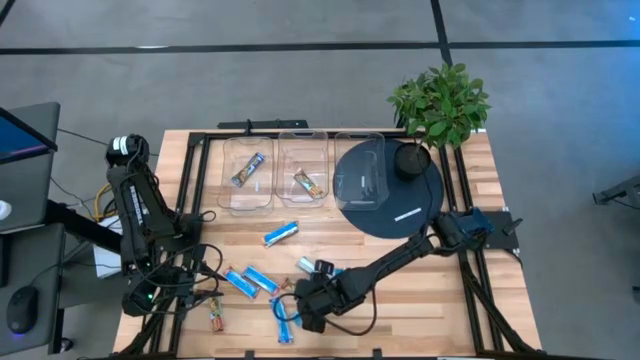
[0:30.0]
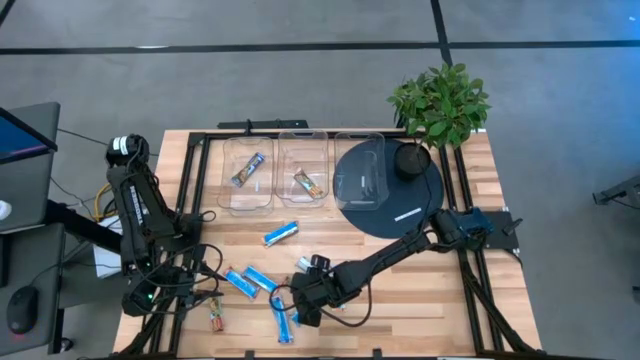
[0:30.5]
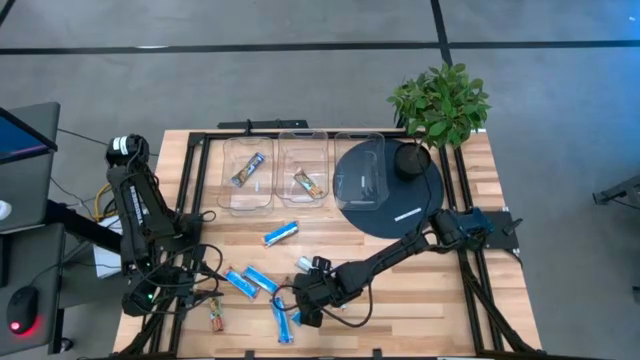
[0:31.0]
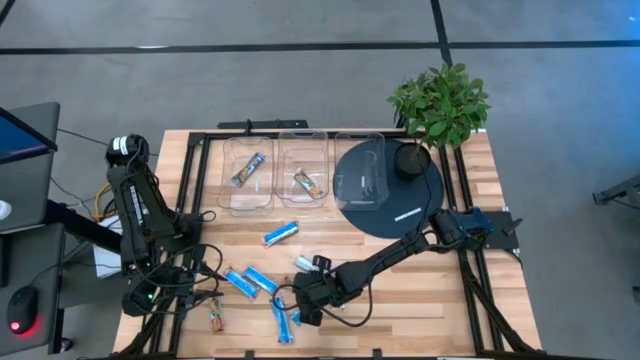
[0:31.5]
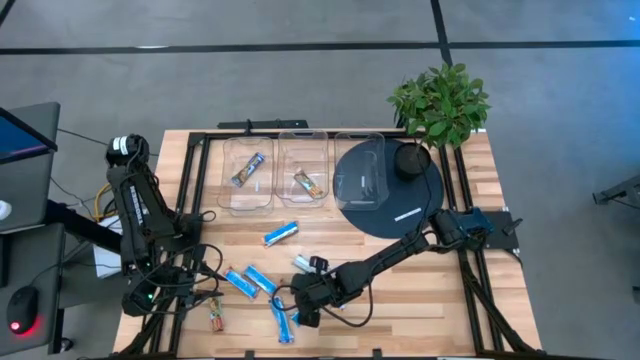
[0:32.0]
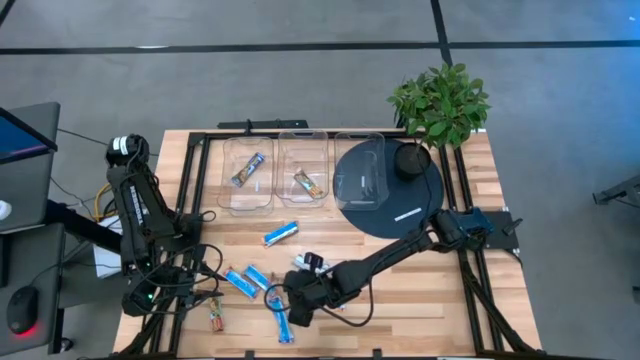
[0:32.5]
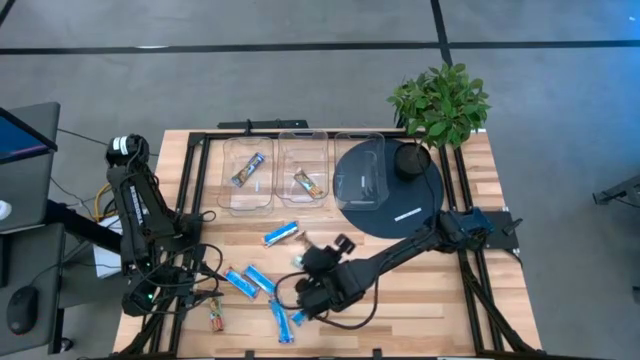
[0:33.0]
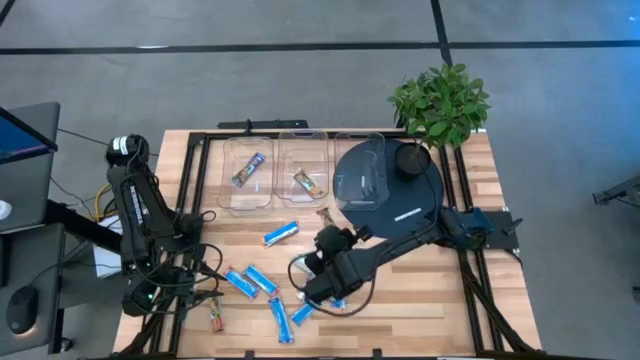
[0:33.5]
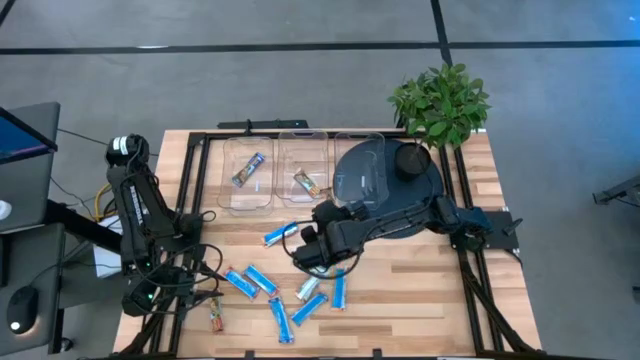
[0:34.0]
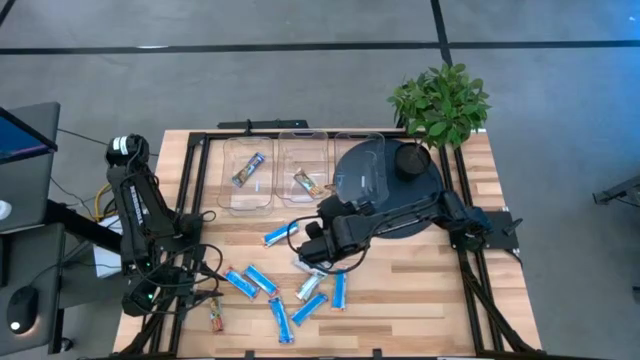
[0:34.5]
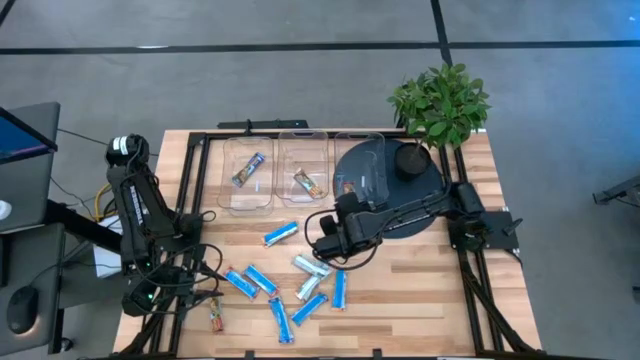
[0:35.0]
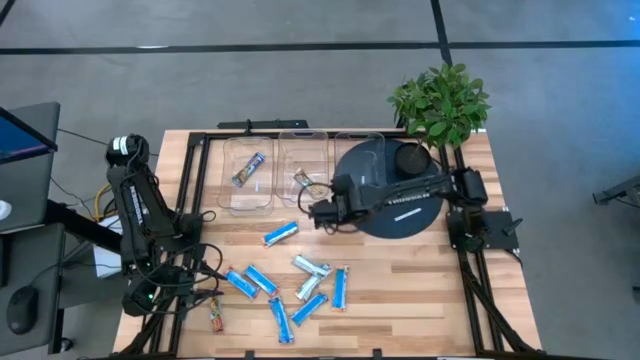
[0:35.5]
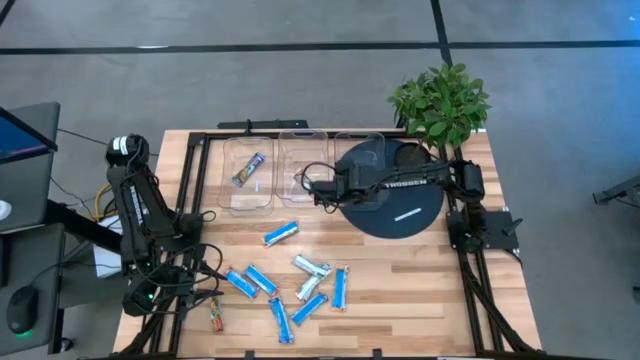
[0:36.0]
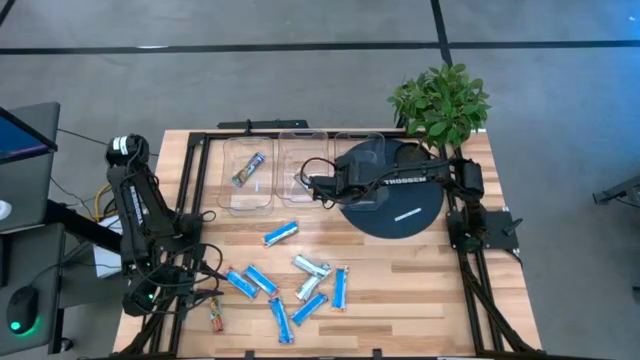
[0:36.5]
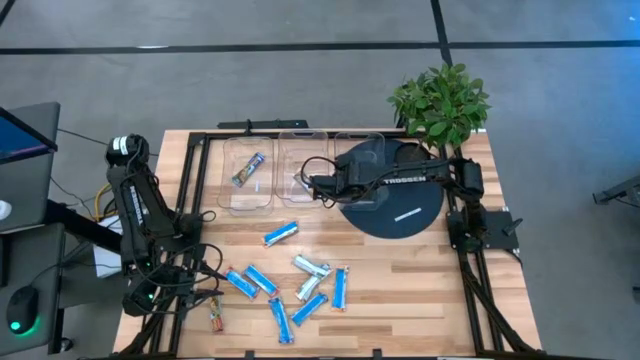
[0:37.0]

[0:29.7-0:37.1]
Task: Pick and place Granola Bars by type
Put the red granola bar into the right transparent bin

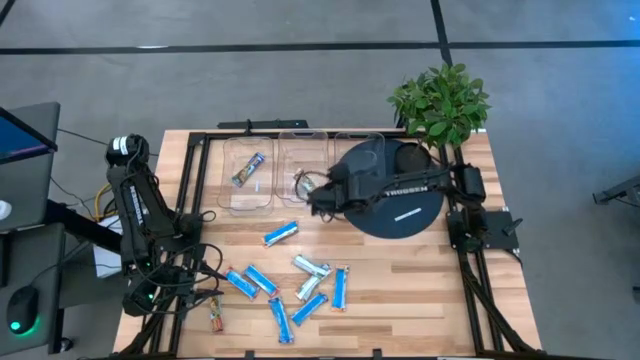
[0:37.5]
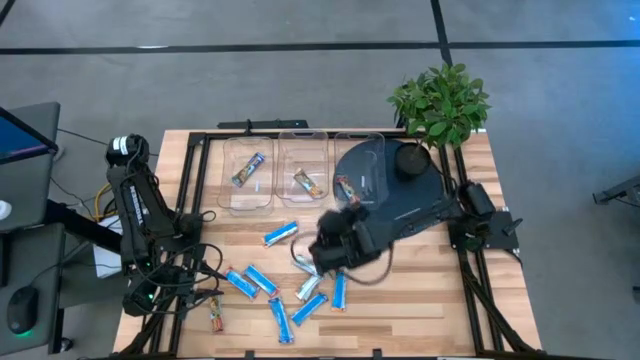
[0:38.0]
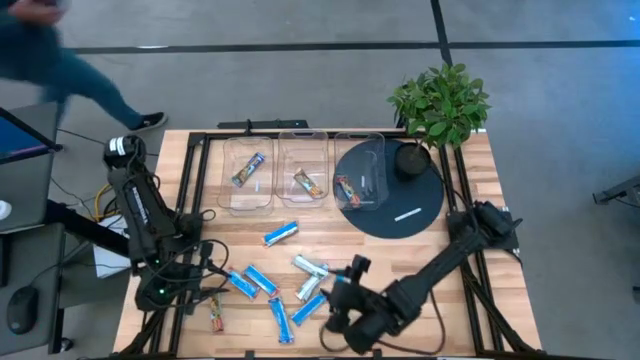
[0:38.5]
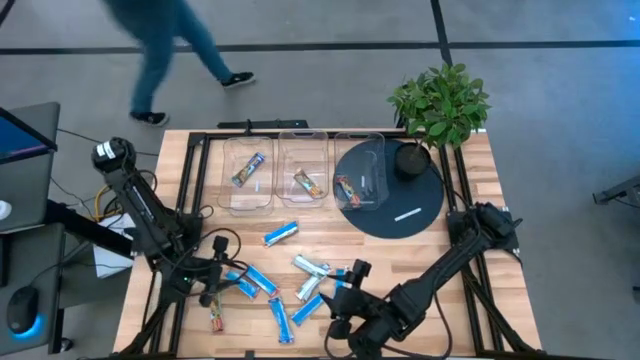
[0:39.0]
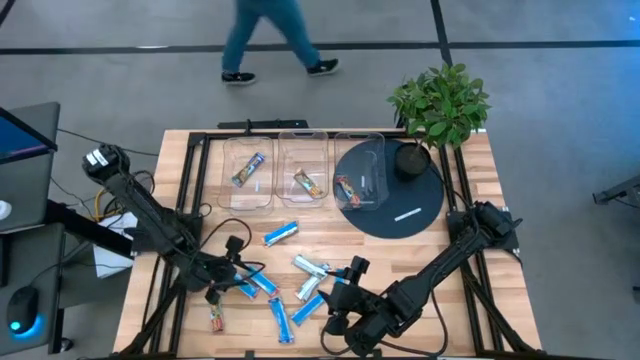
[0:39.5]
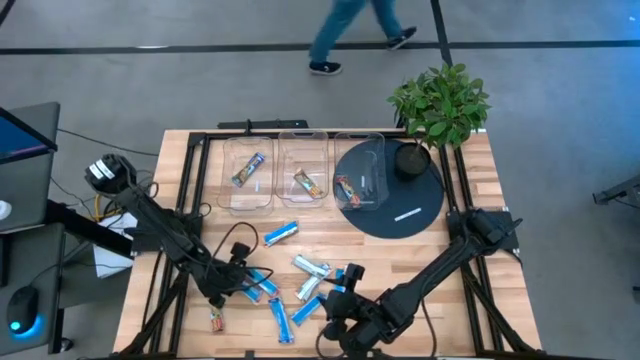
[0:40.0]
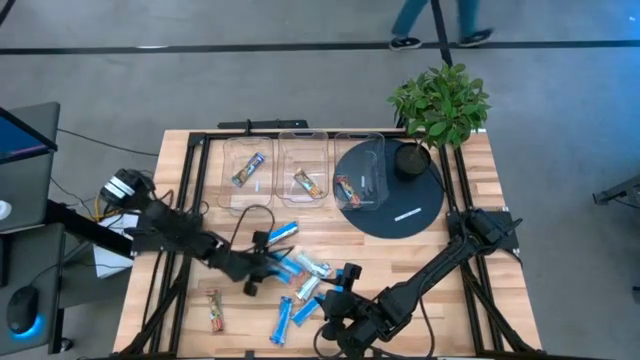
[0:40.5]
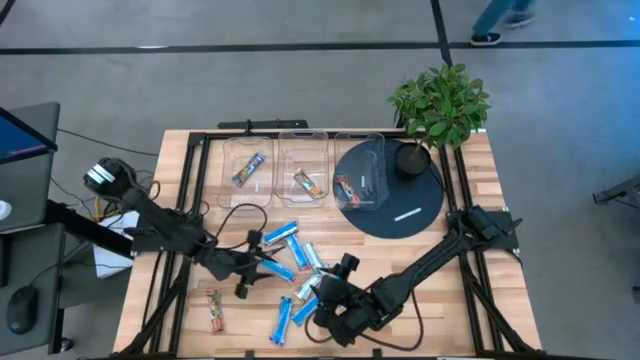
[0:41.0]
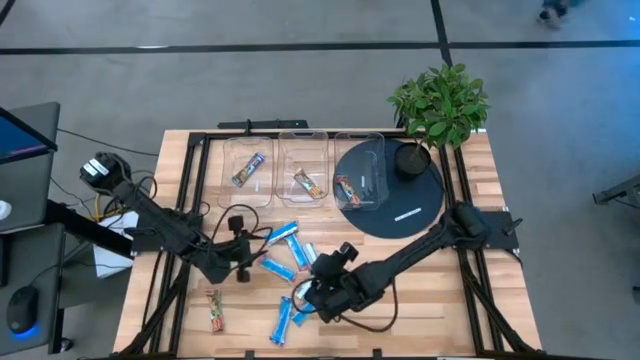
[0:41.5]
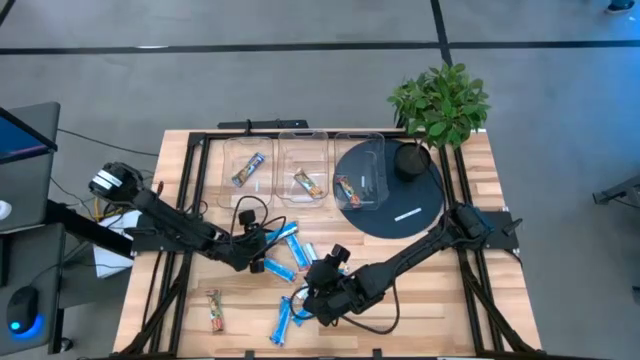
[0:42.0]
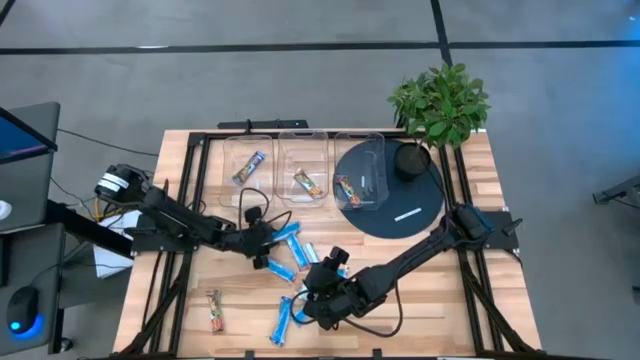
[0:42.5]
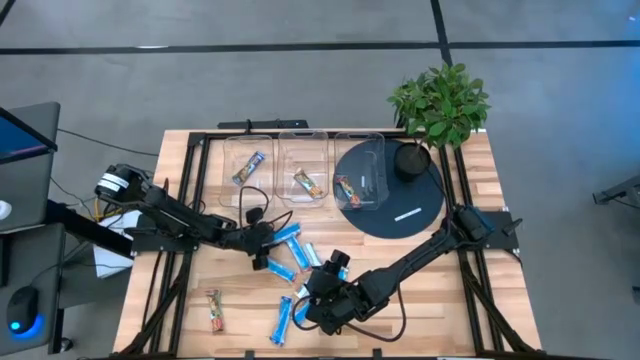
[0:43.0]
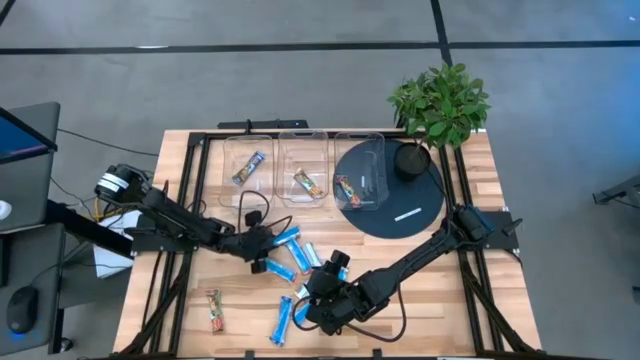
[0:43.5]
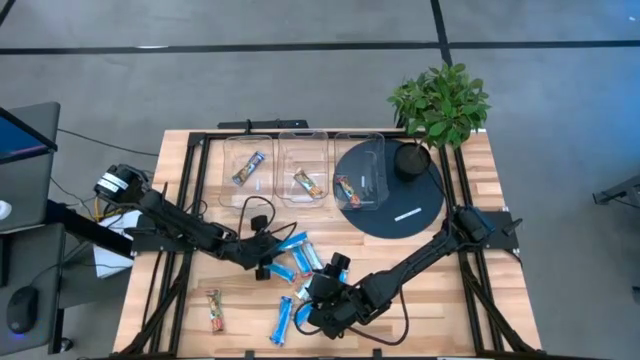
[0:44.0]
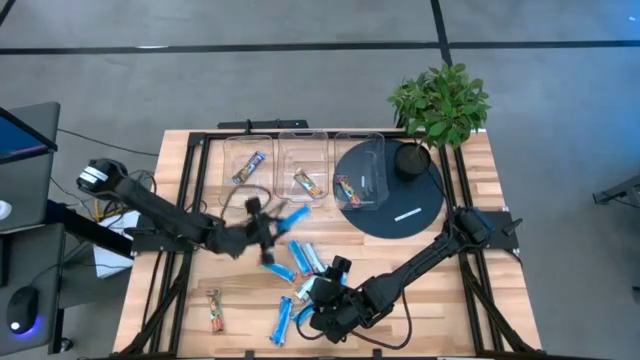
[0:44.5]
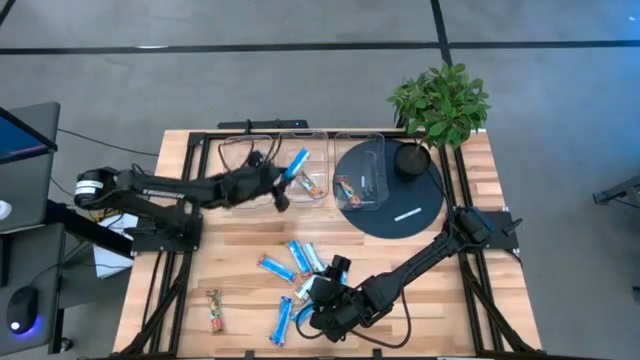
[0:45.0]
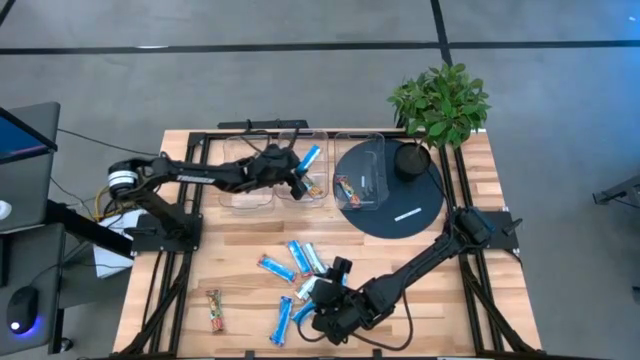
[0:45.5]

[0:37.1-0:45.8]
Put the orange granola bar into the middle transparent bin

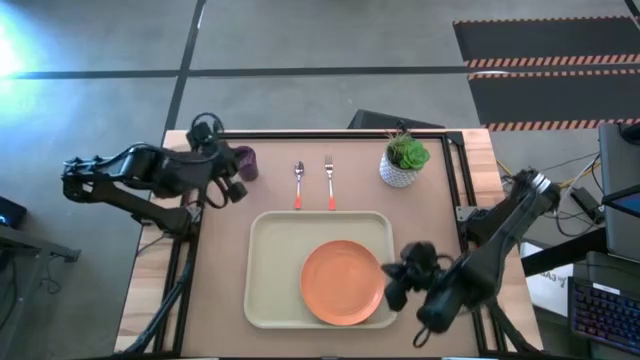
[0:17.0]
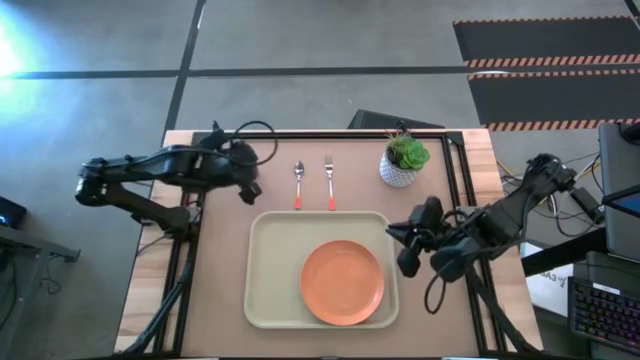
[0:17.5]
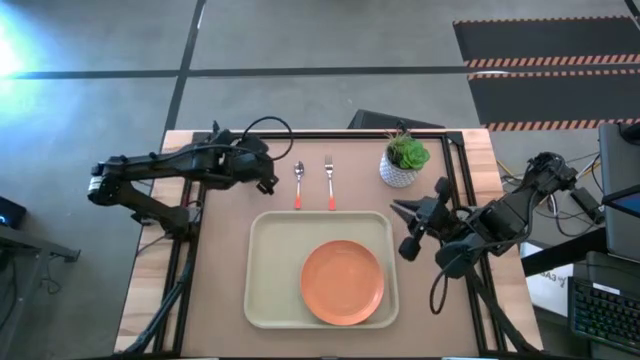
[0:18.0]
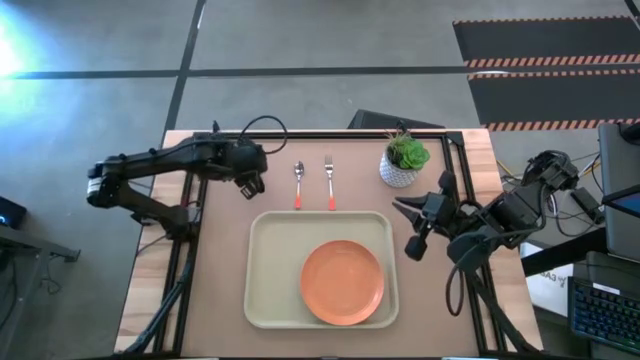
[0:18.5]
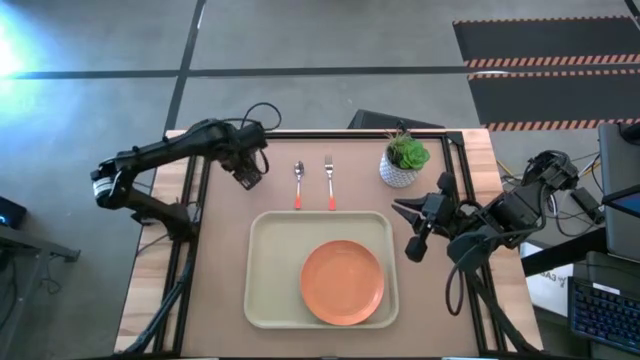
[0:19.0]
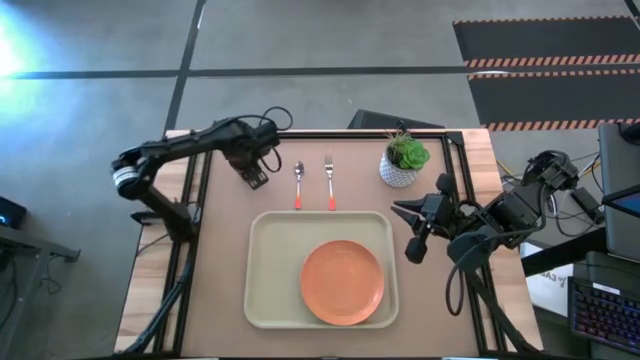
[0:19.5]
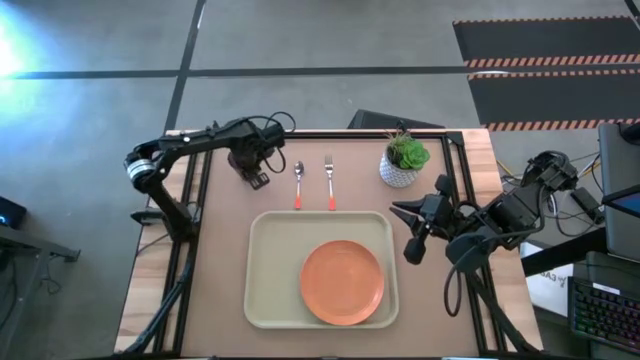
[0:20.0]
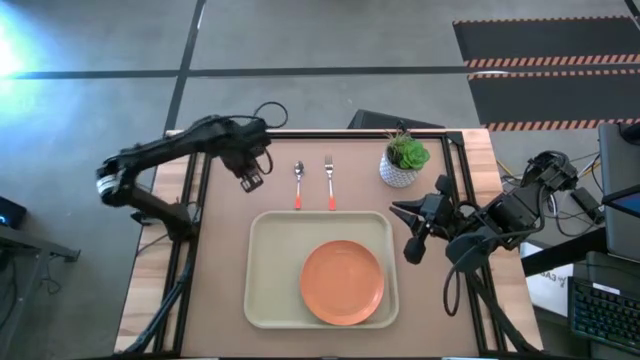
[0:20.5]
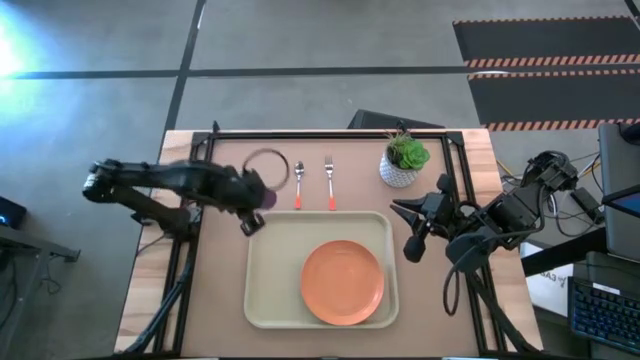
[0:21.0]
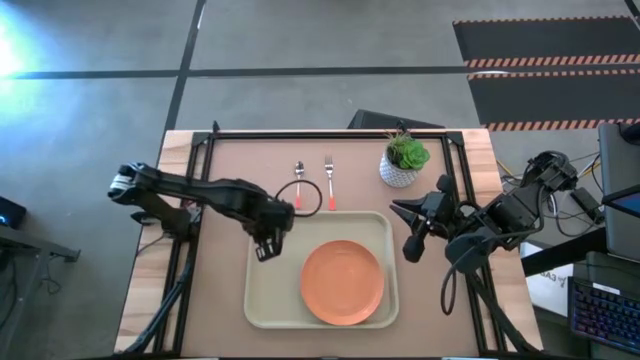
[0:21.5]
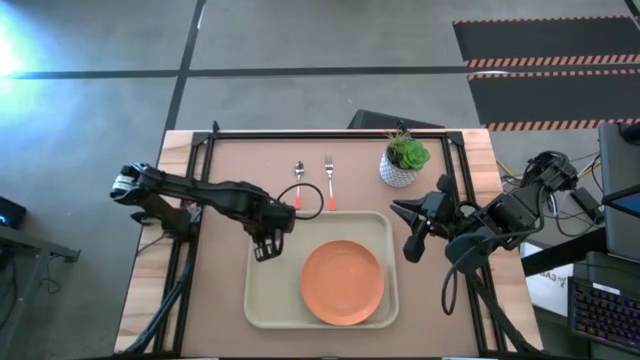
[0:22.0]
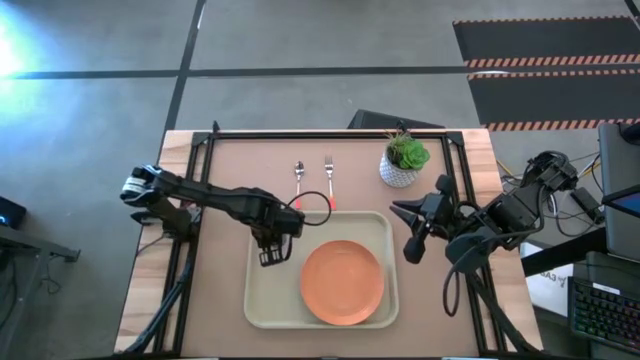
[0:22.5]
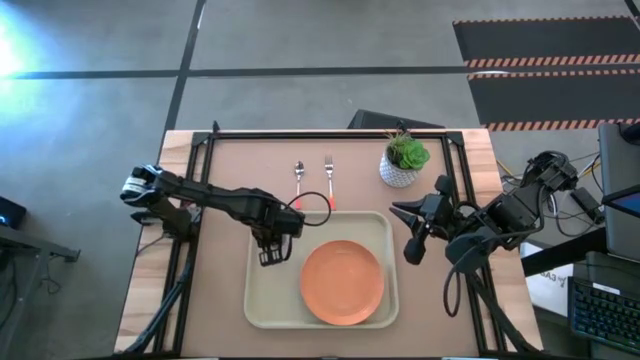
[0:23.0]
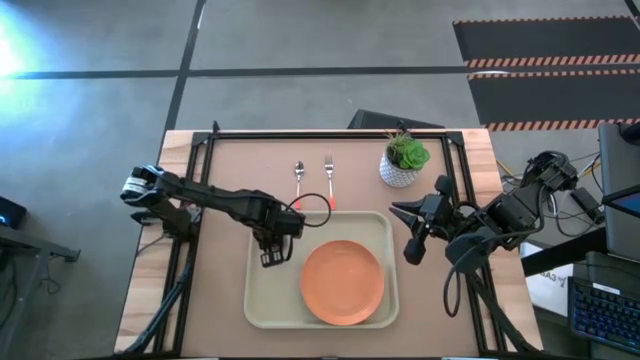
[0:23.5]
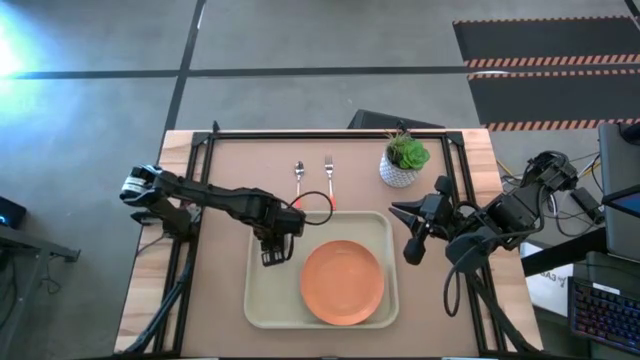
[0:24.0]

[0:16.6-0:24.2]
Task: Pick and place plate/cup/fork/spoon on tray
Put the violet cup on the white tray to the top left of the orange plate
